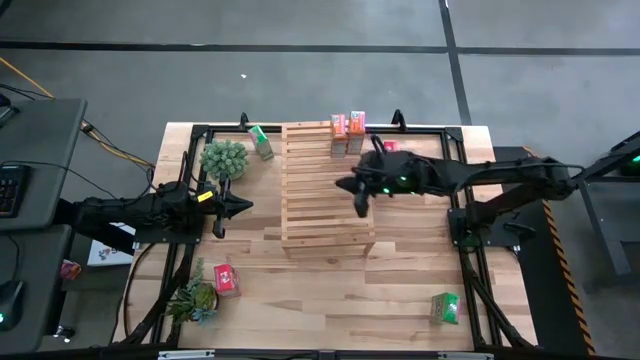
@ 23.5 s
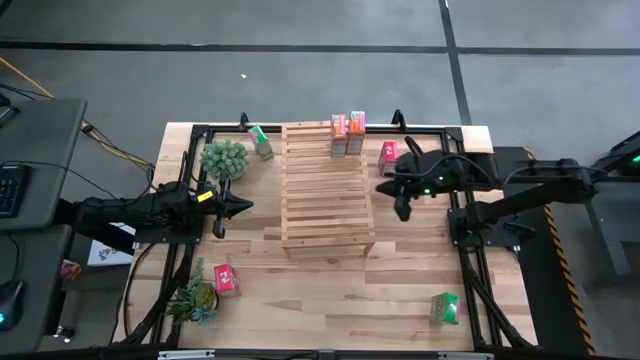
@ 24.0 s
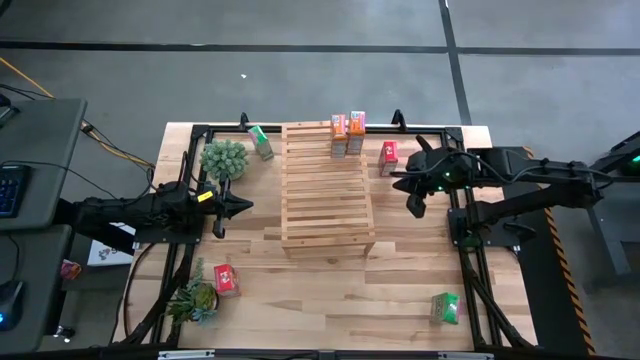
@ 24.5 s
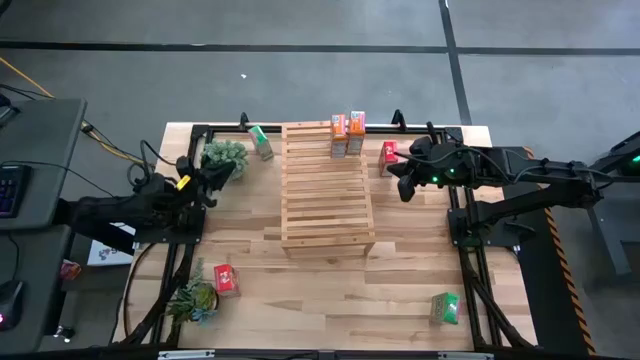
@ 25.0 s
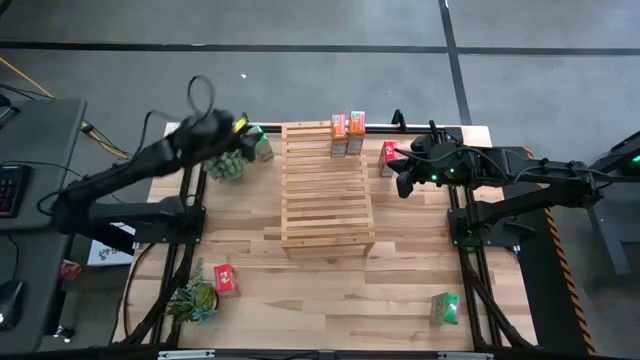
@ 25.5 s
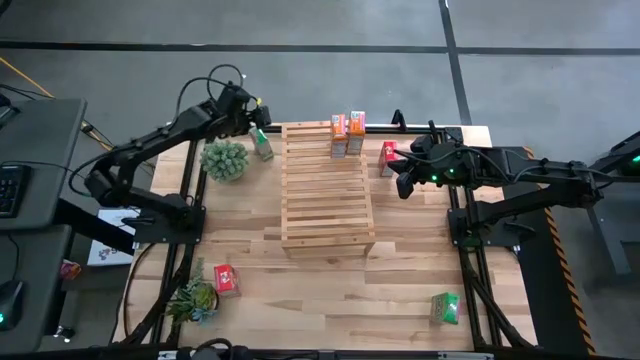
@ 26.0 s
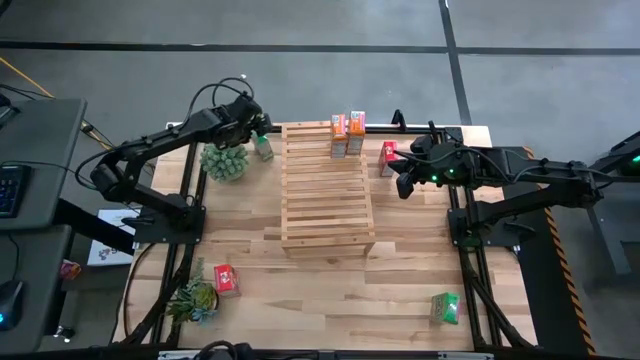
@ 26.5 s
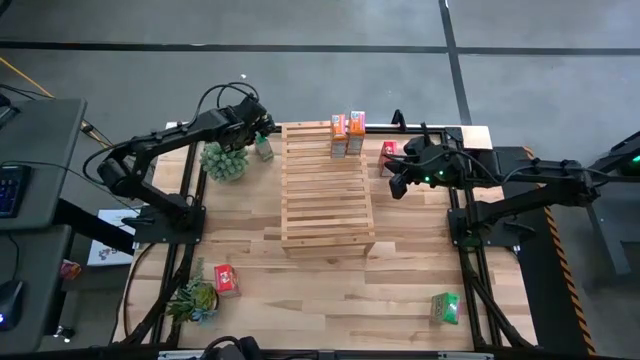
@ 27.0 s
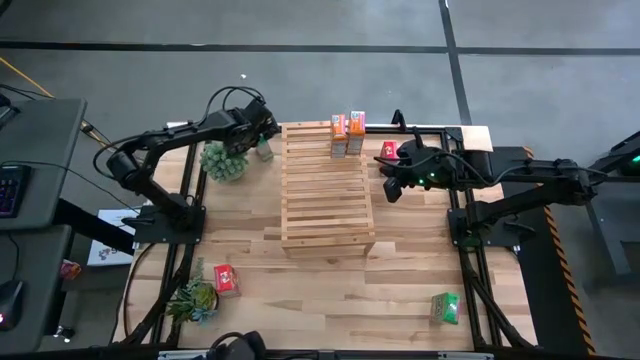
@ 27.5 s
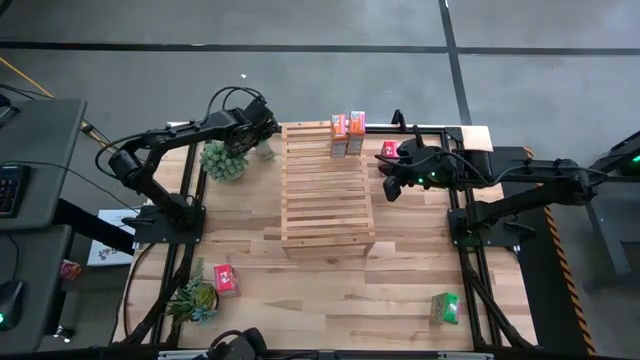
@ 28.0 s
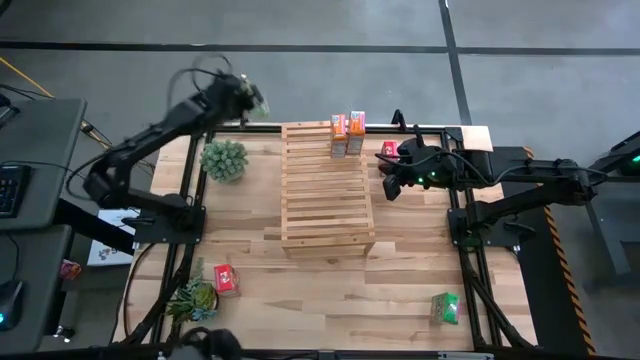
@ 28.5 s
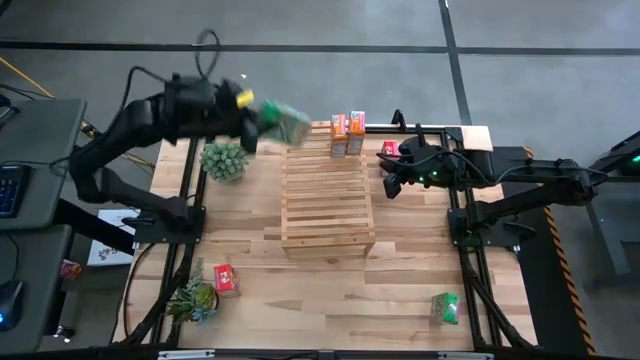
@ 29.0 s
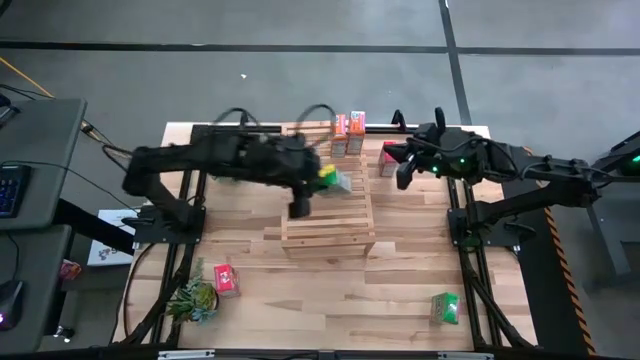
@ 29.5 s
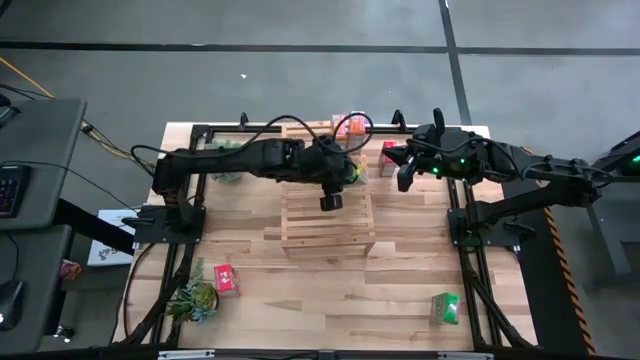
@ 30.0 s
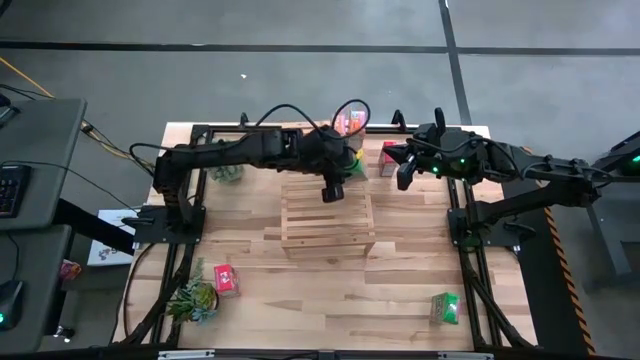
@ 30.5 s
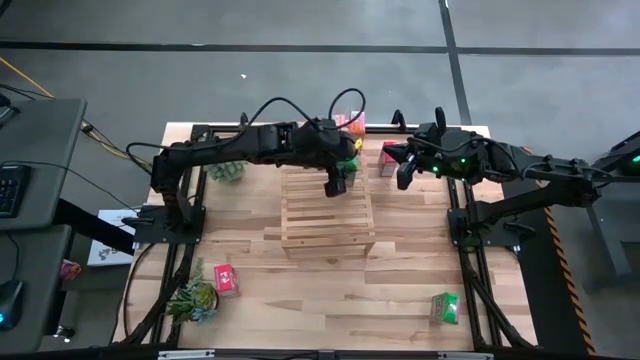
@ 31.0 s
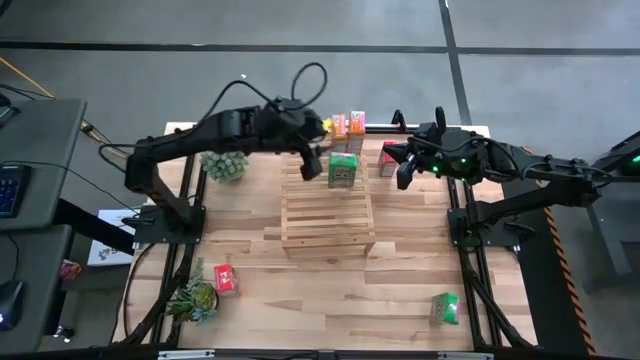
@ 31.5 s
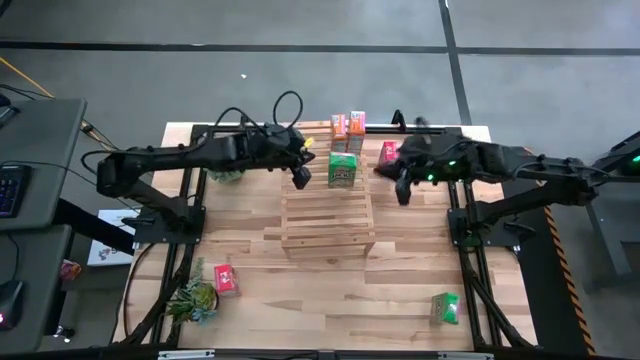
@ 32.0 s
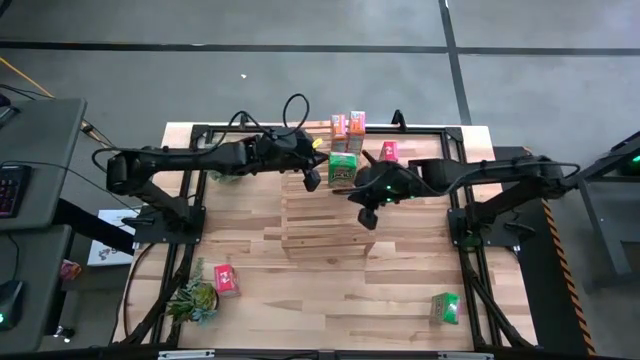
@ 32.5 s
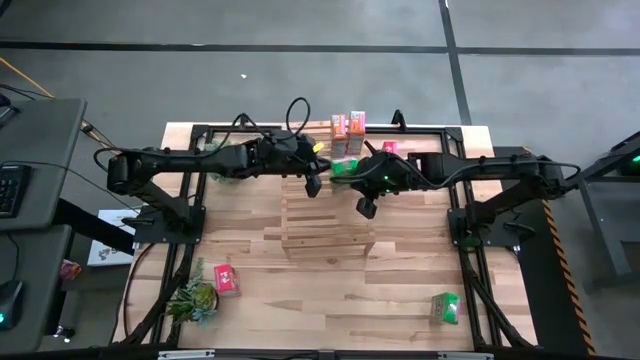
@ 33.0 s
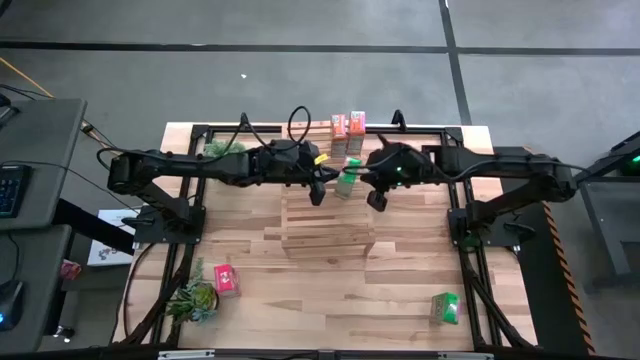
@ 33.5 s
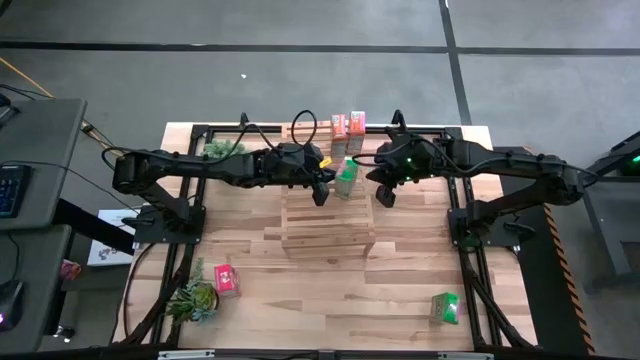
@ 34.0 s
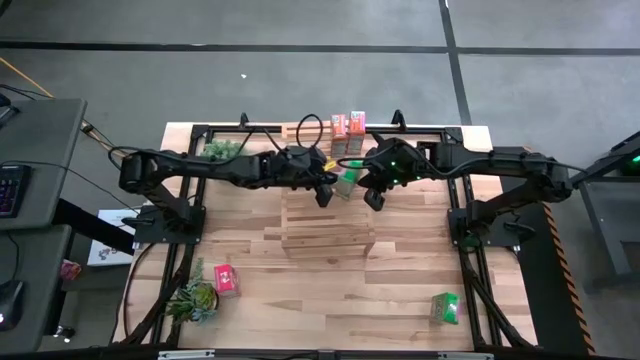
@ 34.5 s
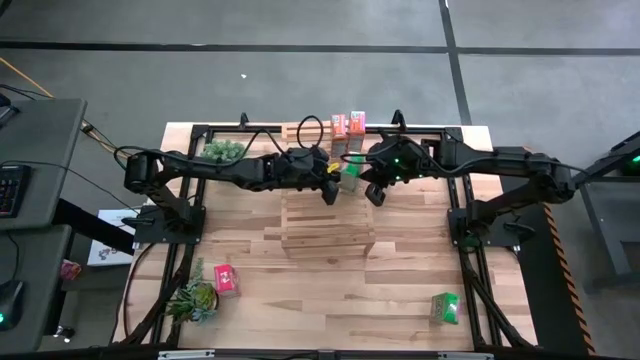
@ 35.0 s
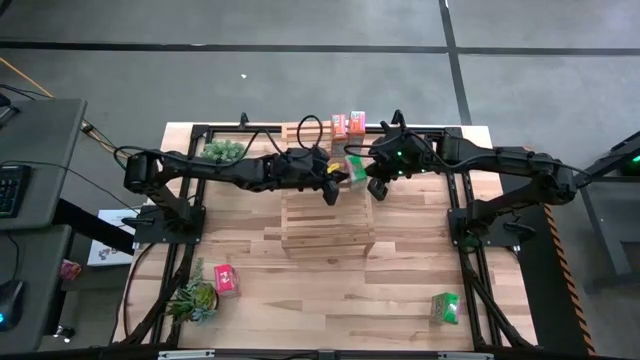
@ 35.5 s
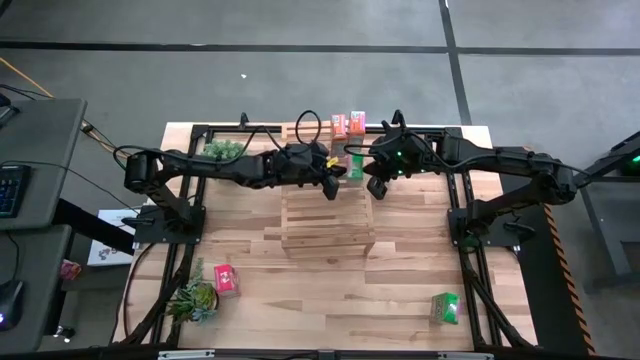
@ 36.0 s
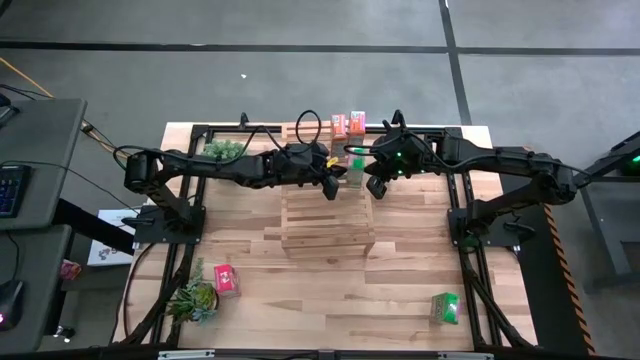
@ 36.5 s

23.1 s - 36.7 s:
Task: Stack cereal on shelf
Put the top green cereal box on the shelf

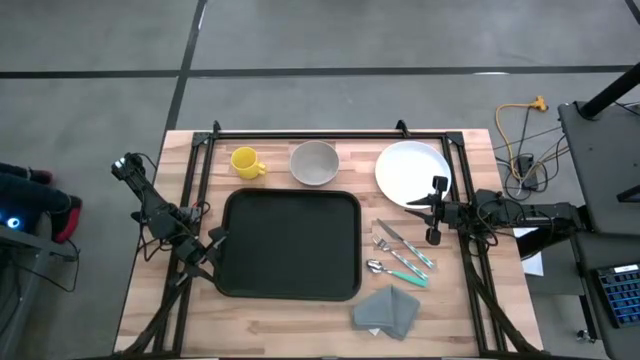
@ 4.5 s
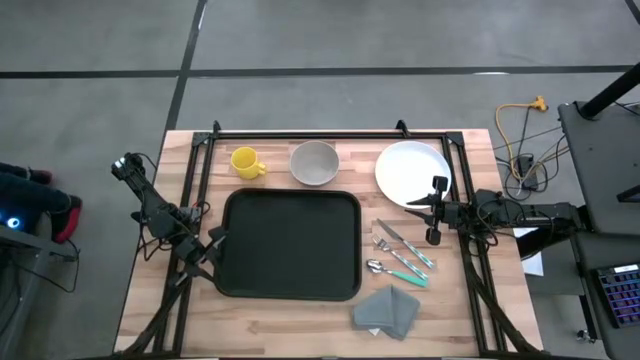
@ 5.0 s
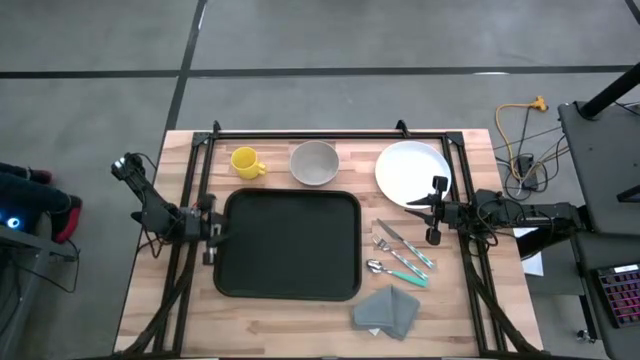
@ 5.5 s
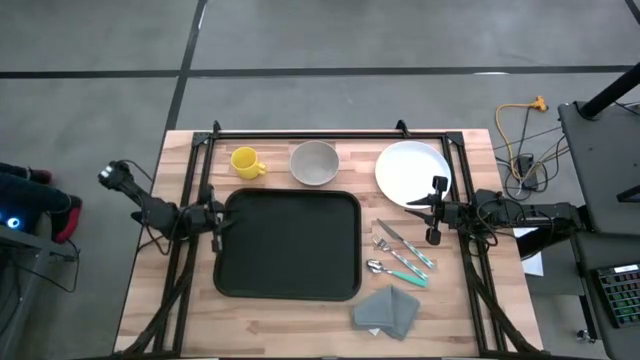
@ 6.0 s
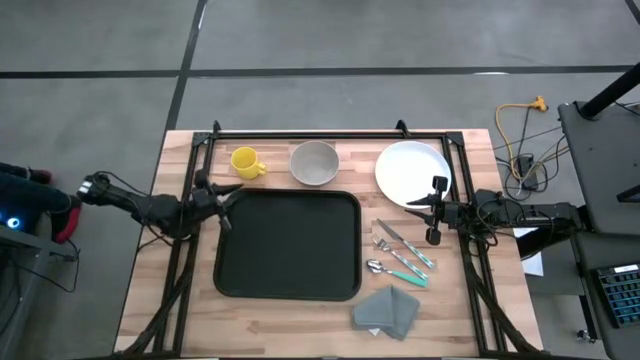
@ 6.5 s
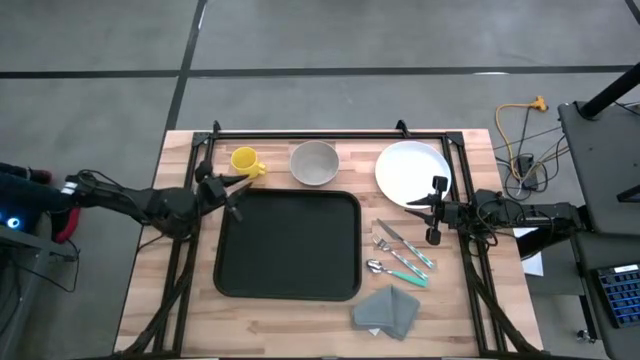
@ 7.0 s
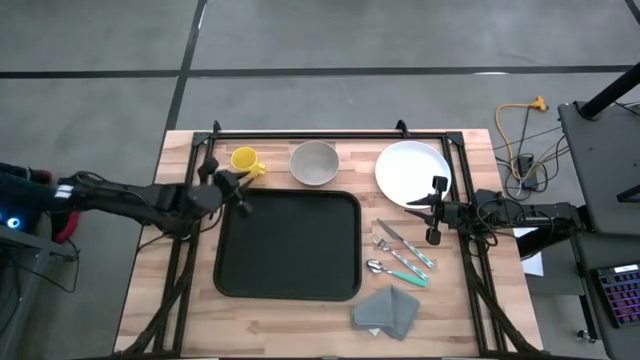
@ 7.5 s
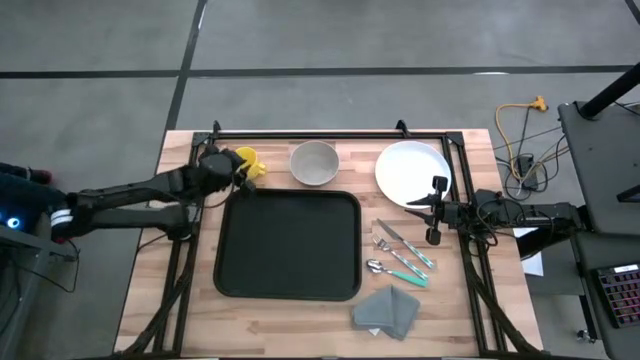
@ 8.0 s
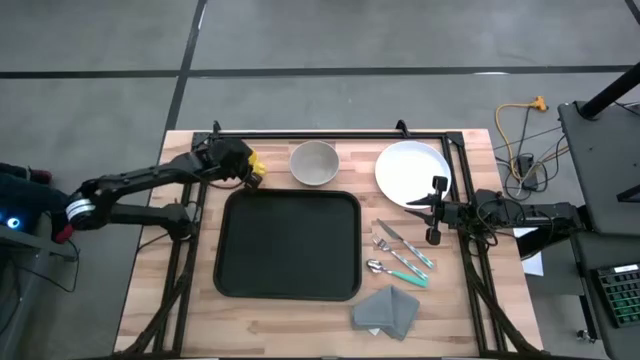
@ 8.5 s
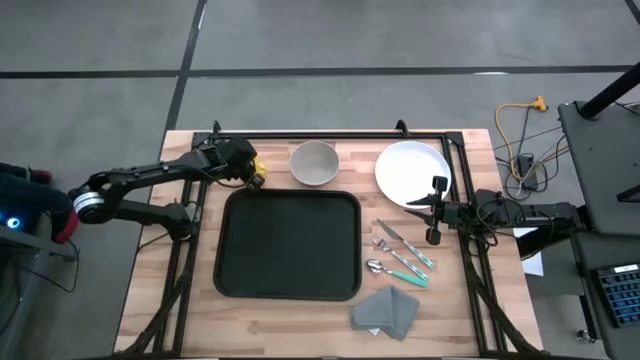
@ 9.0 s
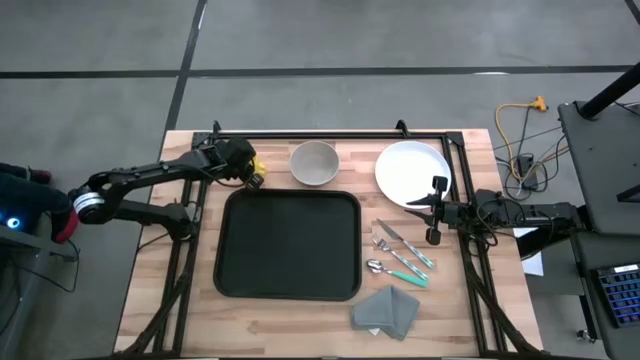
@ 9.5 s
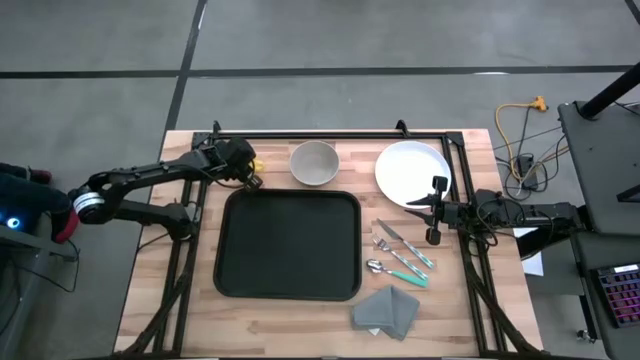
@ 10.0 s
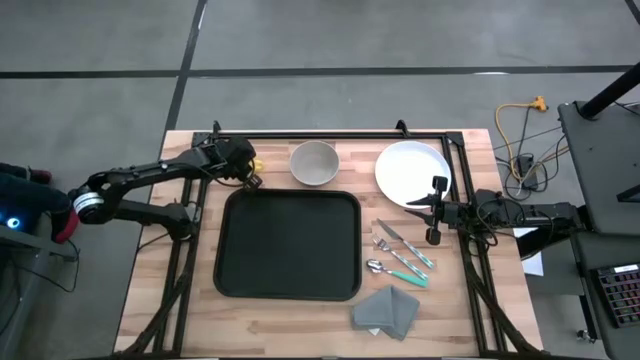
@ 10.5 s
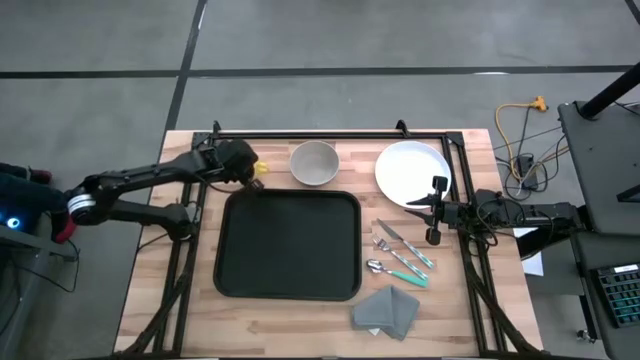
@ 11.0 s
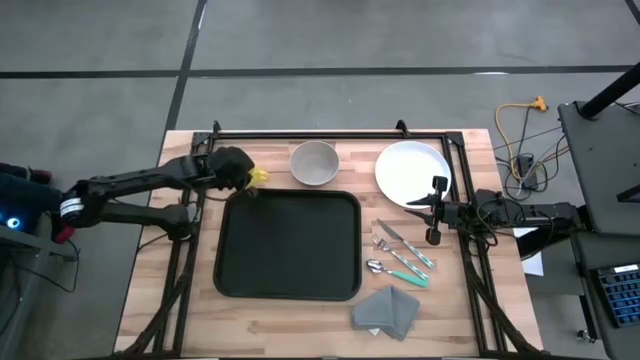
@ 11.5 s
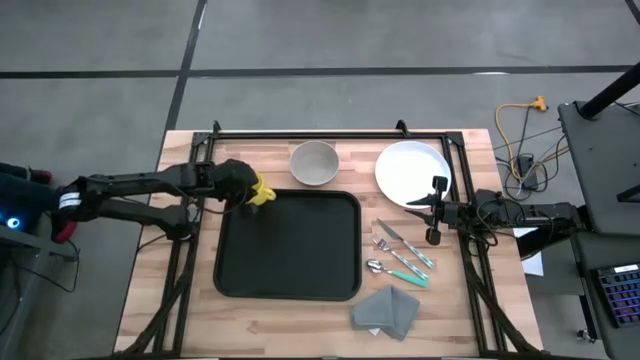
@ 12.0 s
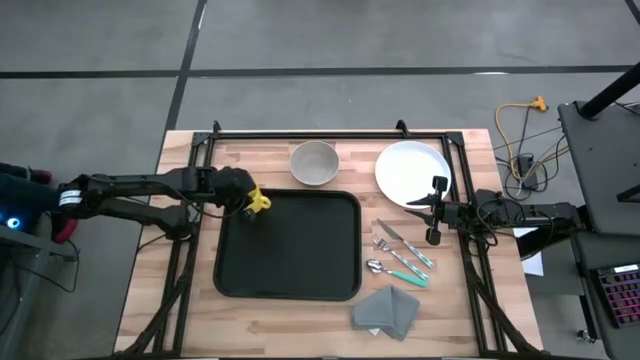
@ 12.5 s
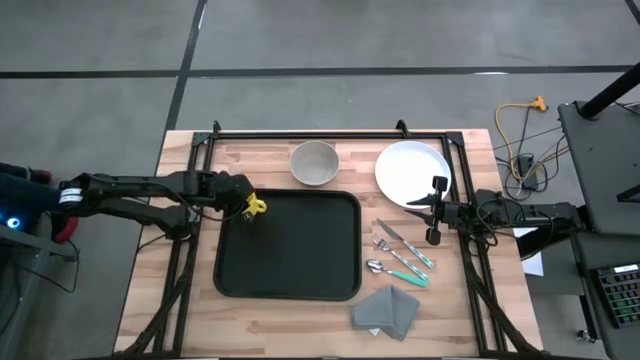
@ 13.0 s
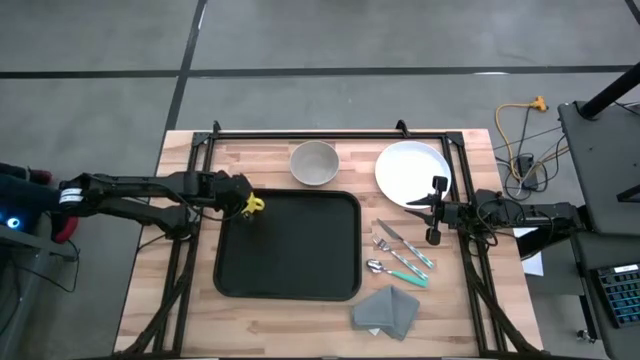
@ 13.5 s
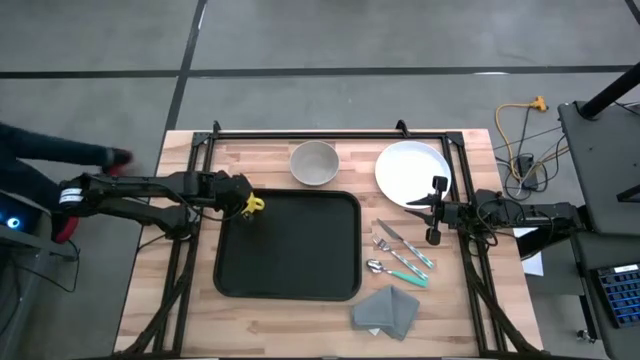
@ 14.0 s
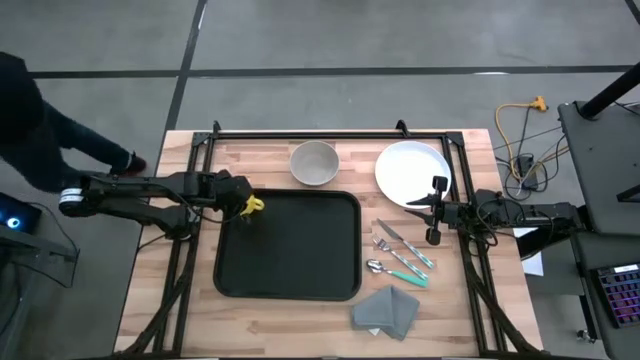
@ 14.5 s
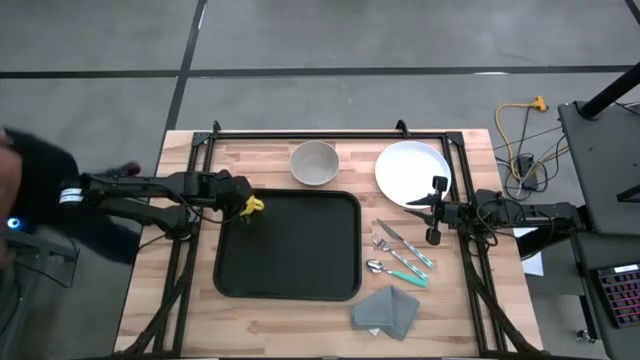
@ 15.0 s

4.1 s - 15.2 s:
Task: Set up tray
Put the yellow cup on the top left of the black serving tray
